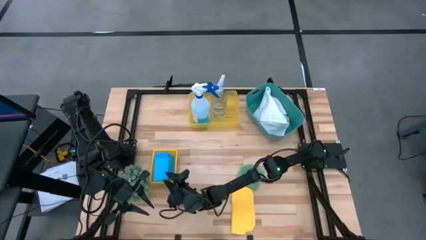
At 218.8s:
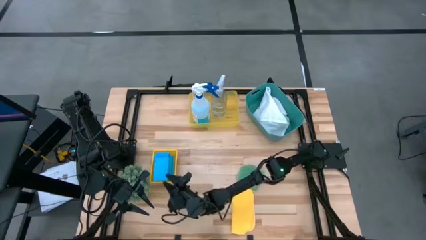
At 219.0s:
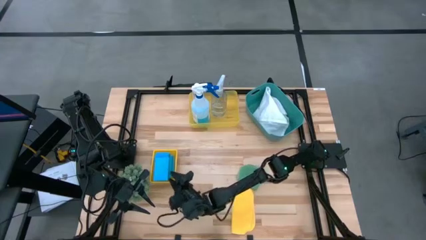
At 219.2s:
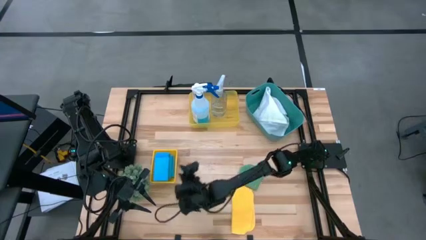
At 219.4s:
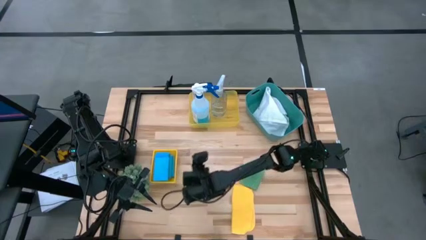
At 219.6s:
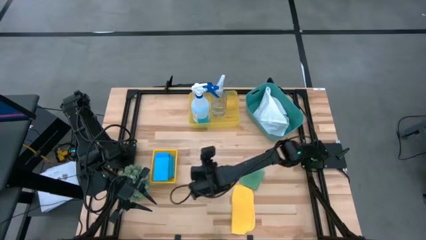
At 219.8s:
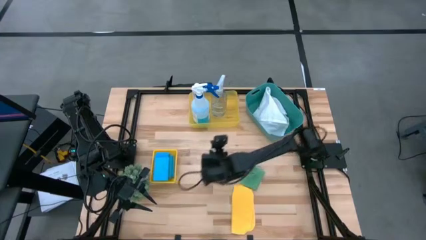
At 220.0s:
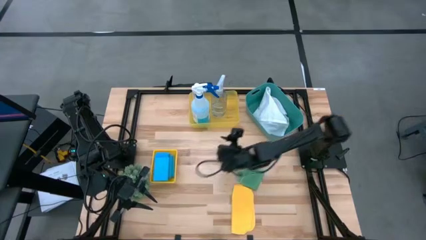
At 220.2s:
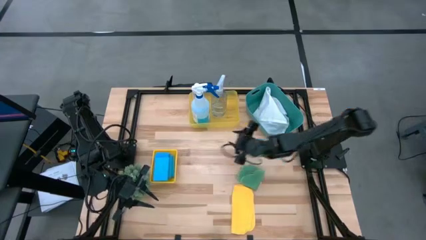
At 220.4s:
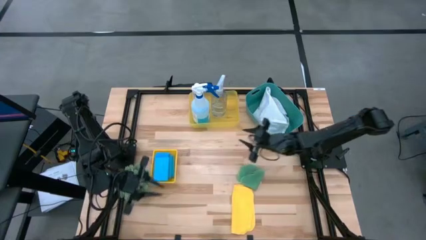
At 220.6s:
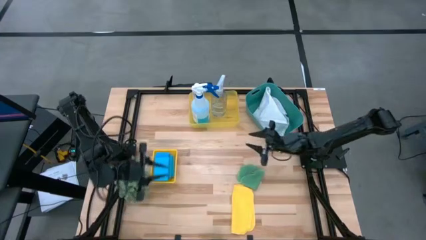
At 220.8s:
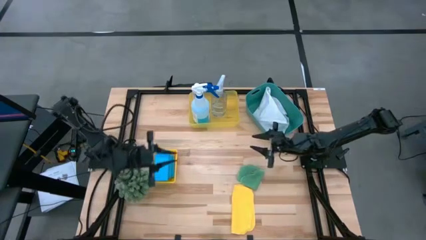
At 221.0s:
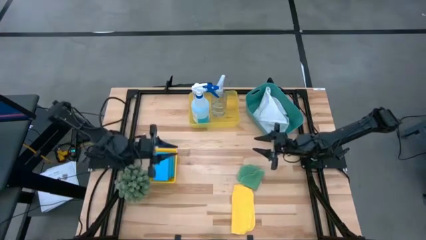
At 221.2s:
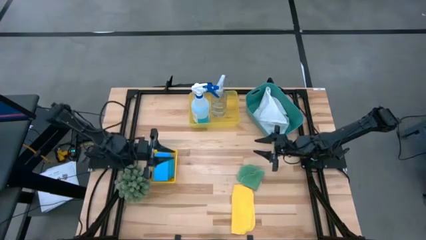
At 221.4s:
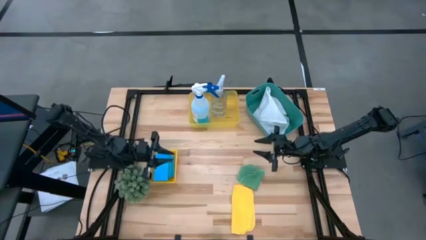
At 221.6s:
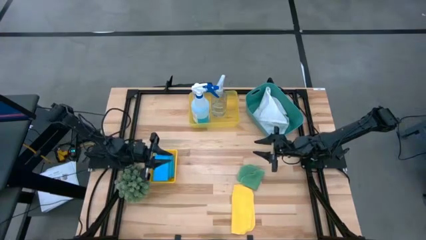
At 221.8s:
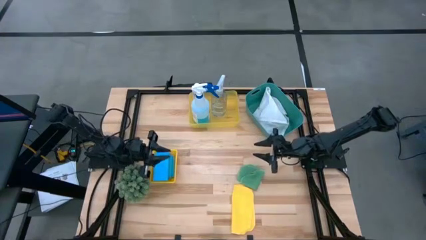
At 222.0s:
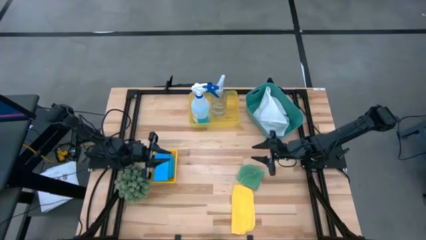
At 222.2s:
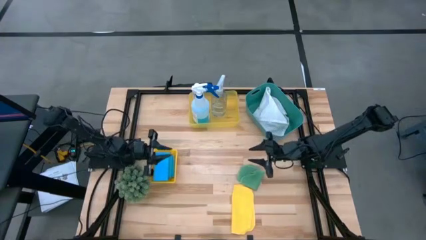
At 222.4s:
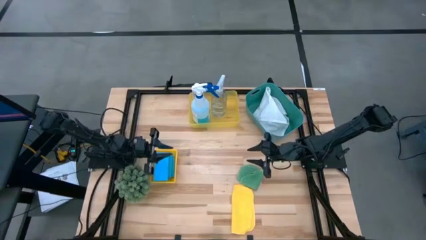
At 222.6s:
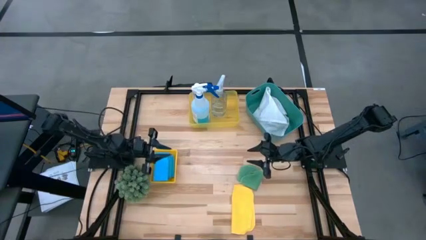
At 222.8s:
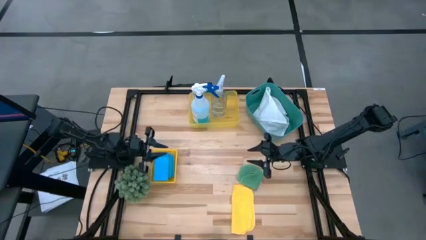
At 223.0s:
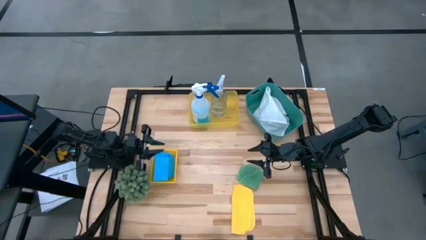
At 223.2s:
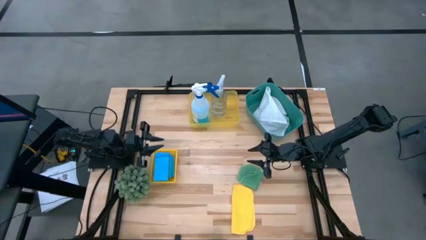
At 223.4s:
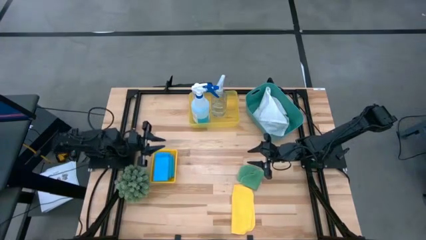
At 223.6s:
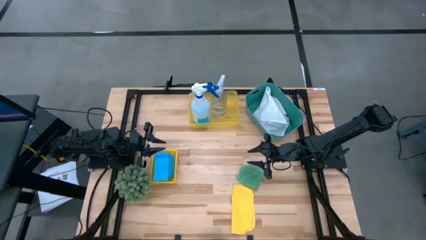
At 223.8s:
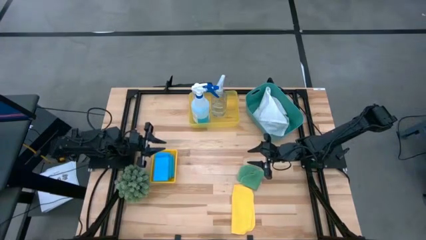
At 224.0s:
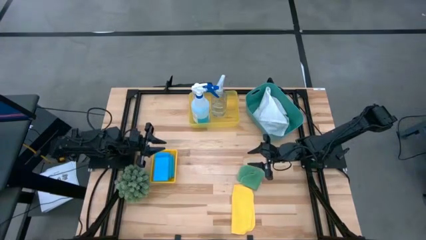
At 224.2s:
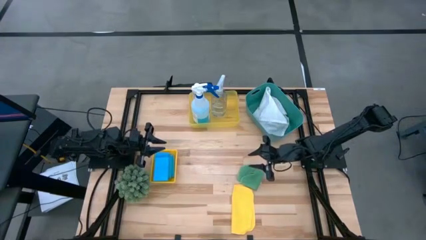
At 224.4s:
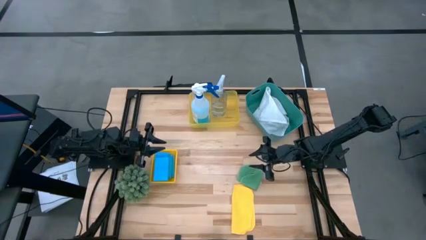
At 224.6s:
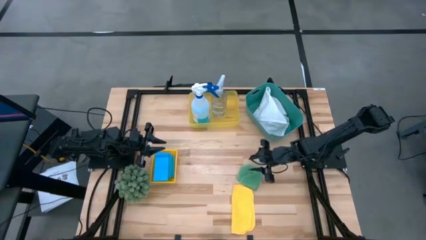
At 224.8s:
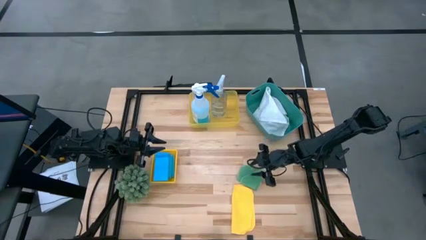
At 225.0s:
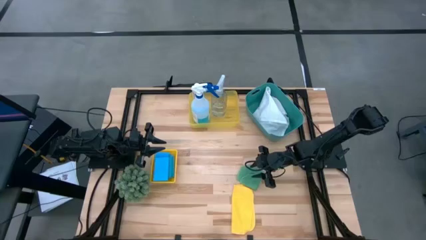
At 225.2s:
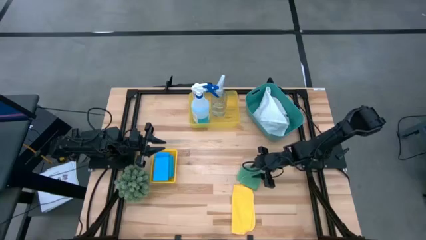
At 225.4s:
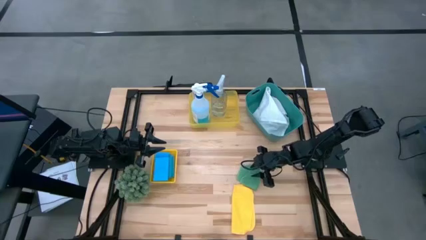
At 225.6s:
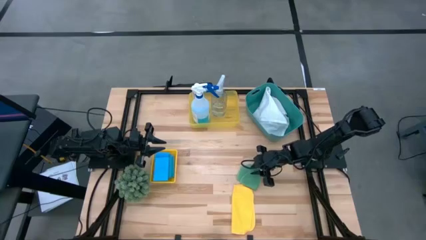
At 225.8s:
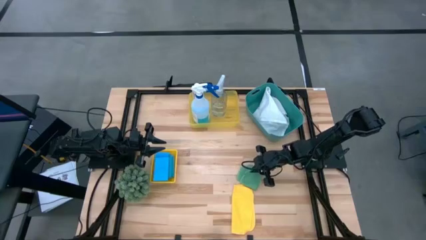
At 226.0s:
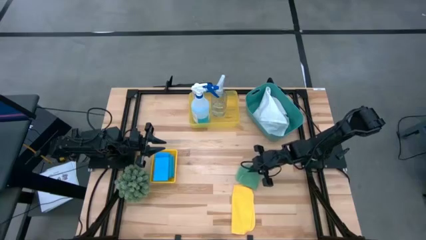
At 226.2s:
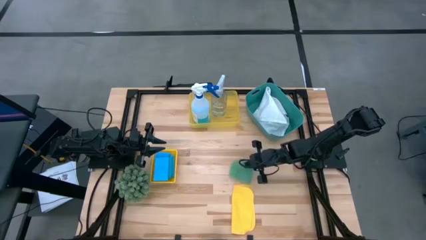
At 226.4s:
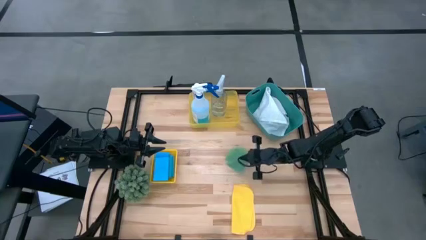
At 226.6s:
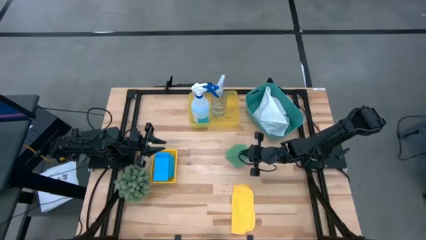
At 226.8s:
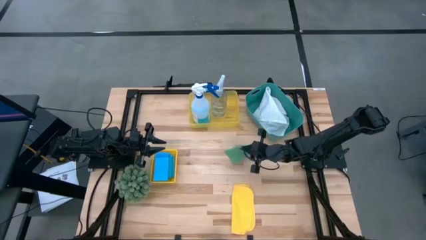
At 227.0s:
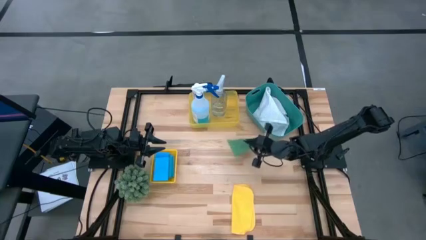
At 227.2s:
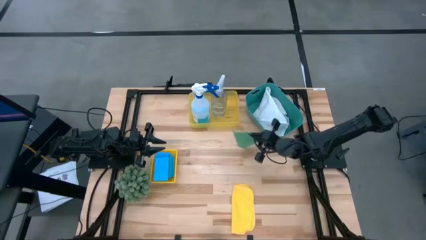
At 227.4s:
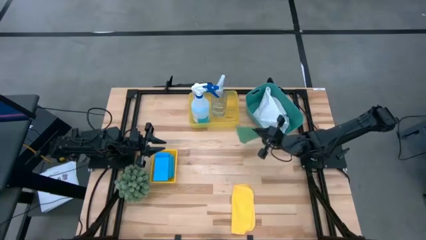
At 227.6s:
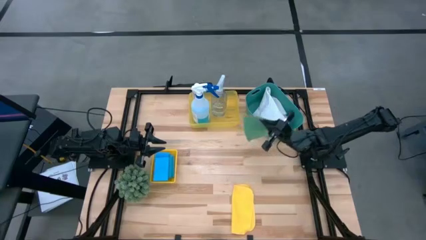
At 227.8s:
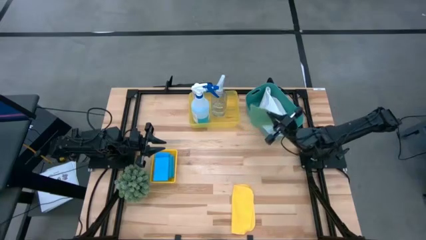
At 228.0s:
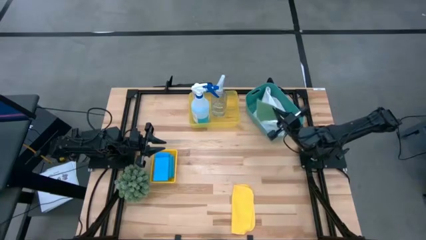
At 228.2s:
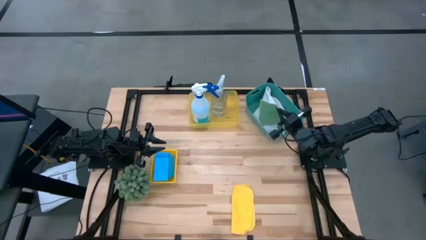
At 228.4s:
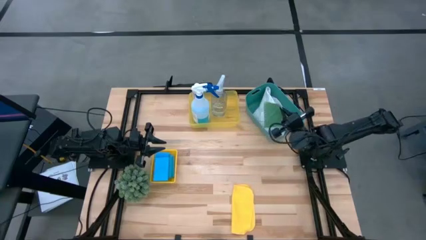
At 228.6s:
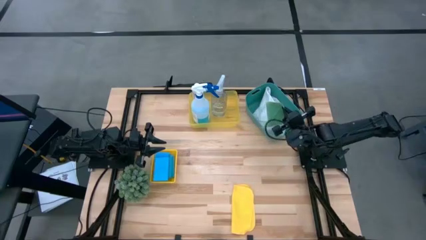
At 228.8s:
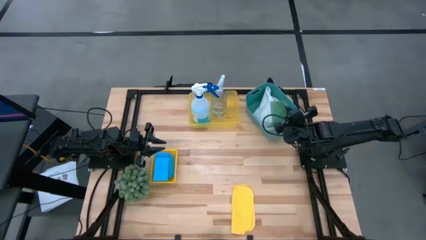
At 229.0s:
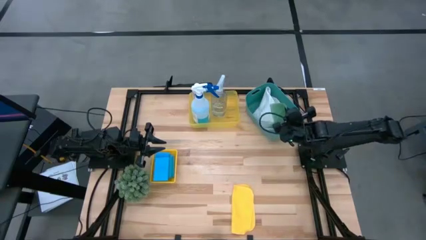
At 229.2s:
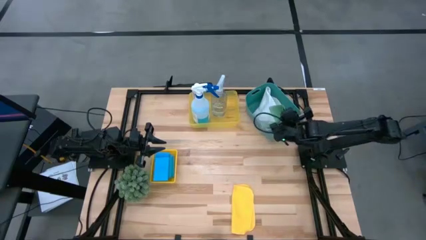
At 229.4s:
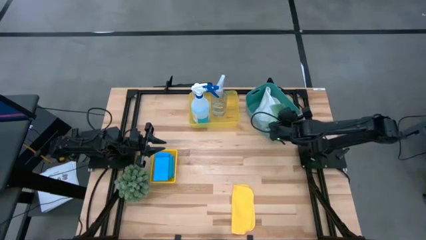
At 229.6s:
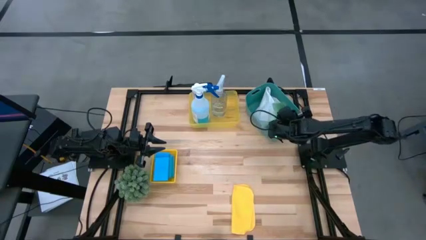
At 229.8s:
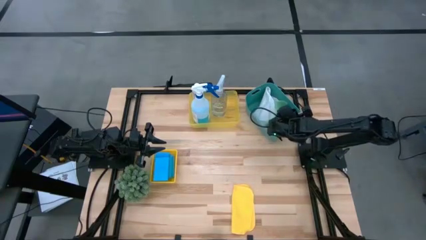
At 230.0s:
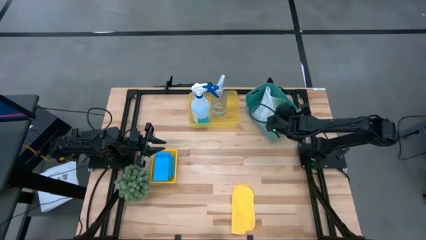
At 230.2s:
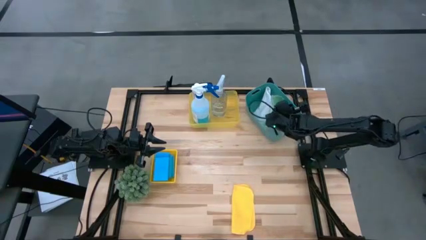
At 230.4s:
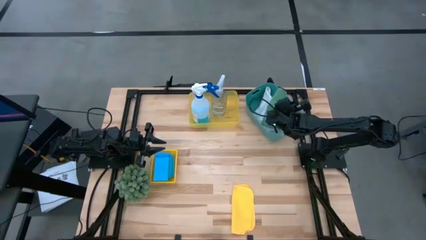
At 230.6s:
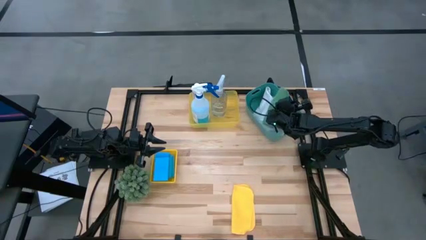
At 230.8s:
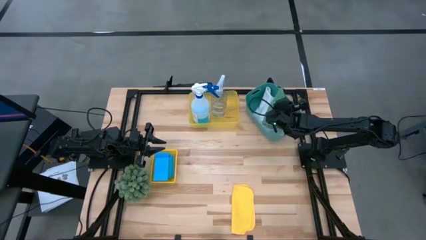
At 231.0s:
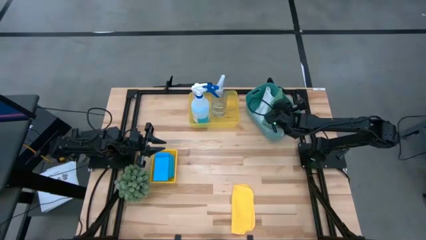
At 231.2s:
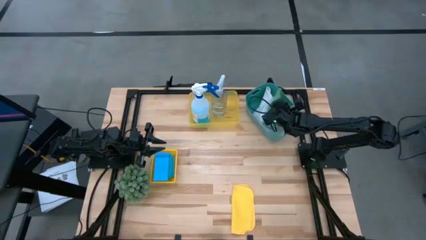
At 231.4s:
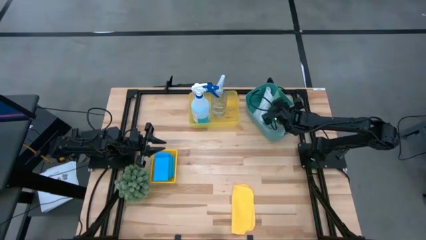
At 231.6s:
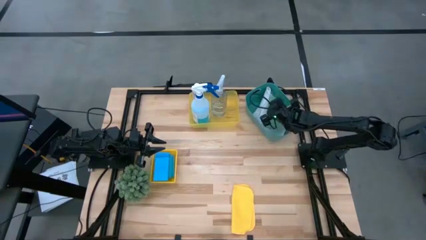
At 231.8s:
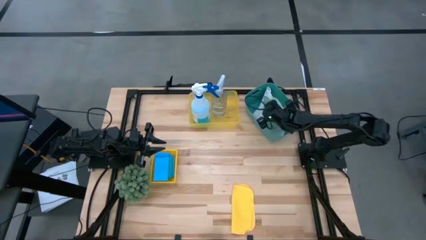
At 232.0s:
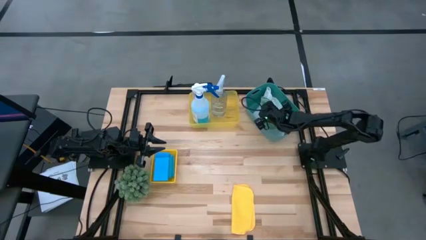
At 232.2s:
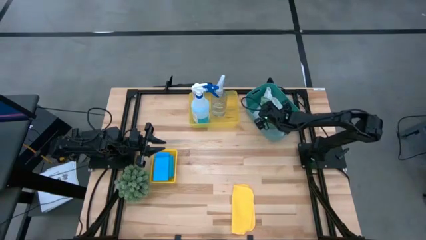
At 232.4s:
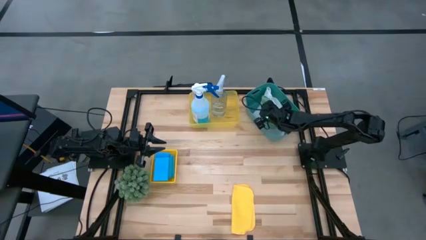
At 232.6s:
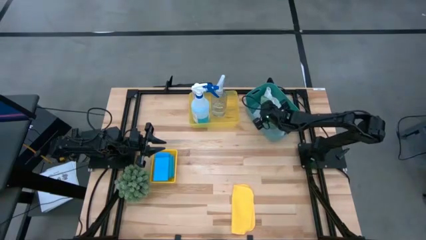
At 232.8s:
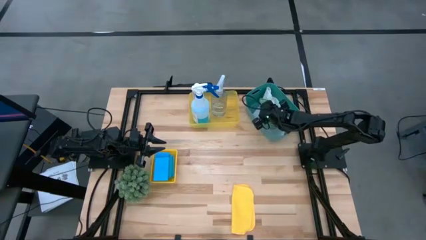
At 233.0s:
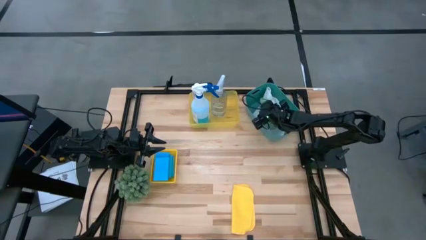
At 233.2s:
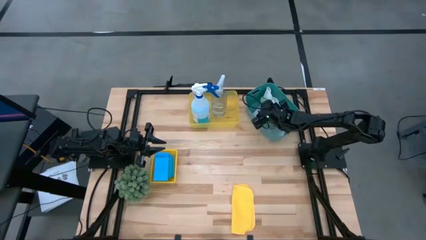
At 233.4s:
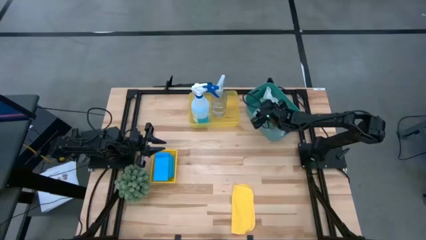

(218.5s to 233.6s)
Task: Pick & Place Kitchen Items
Put the green microfiber cloth into the green bin

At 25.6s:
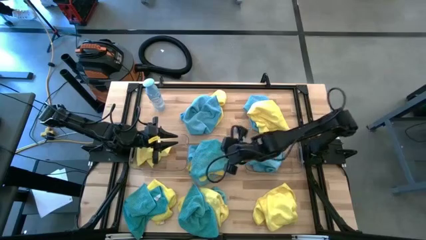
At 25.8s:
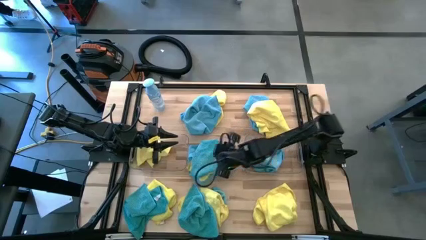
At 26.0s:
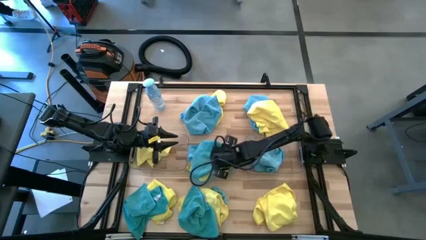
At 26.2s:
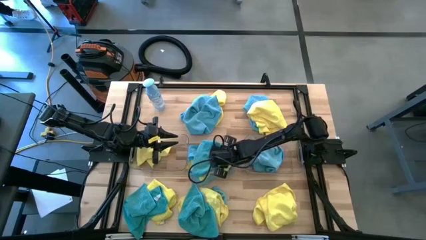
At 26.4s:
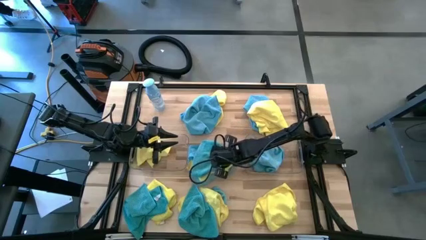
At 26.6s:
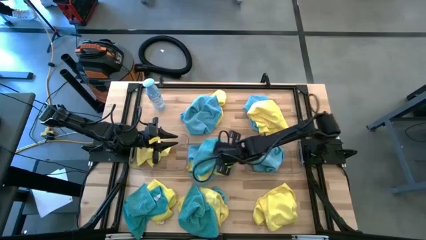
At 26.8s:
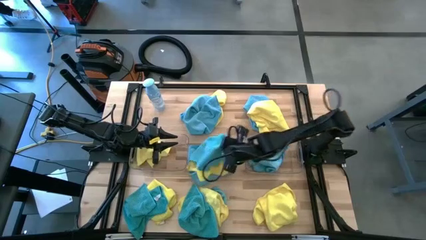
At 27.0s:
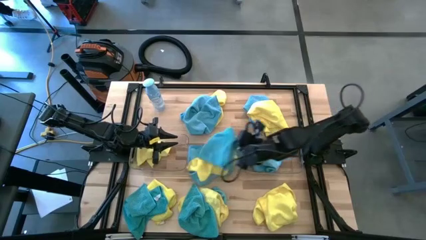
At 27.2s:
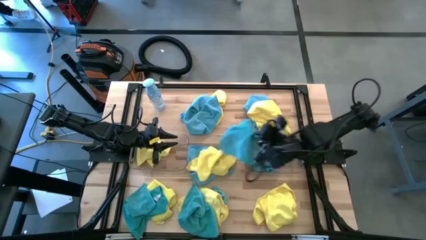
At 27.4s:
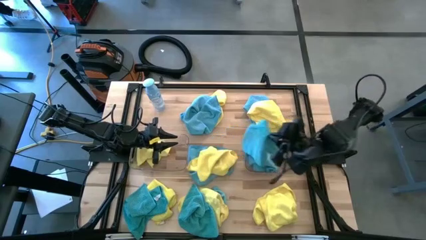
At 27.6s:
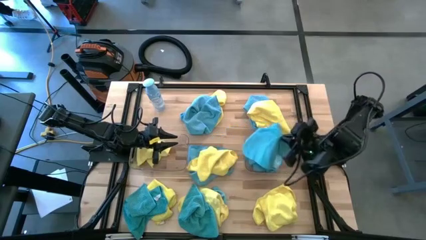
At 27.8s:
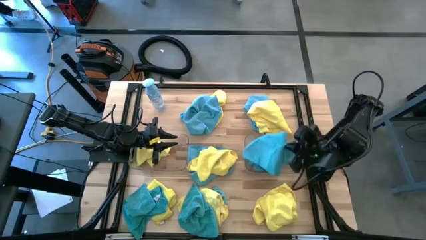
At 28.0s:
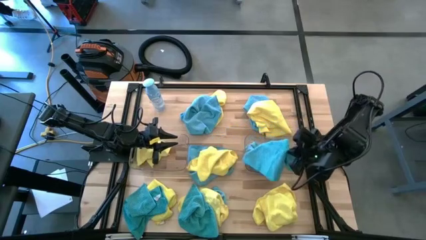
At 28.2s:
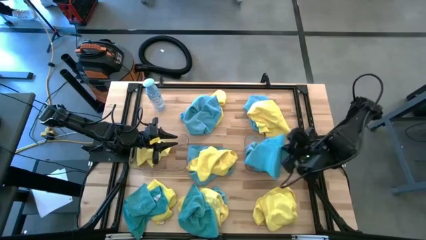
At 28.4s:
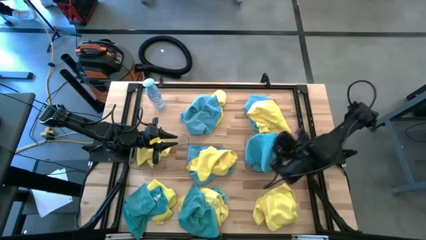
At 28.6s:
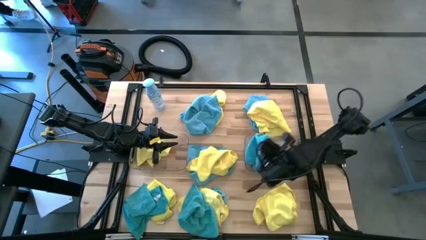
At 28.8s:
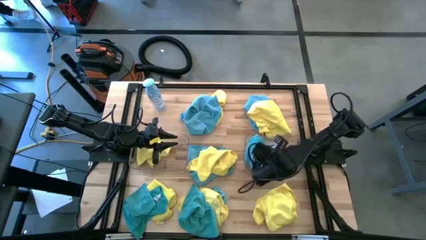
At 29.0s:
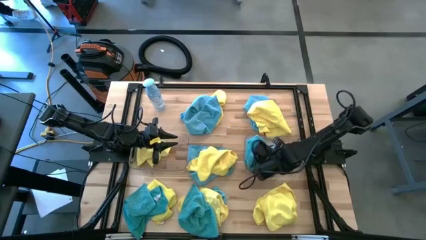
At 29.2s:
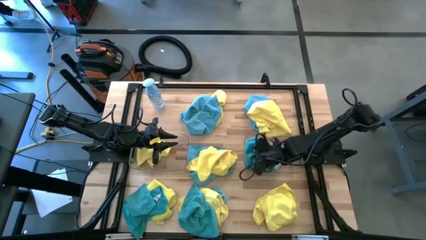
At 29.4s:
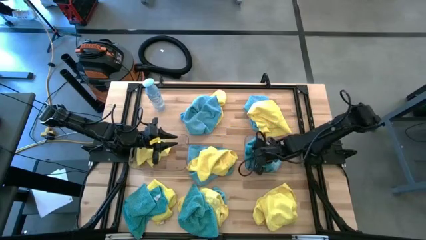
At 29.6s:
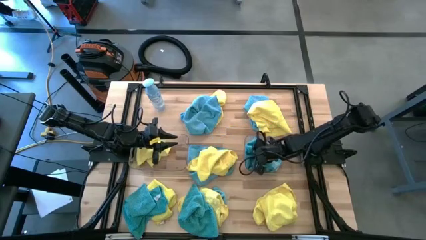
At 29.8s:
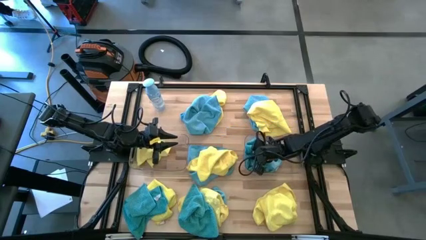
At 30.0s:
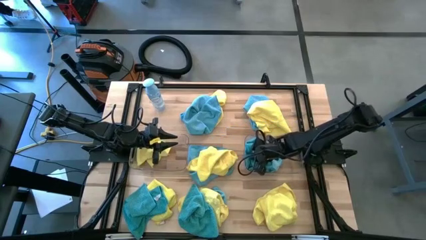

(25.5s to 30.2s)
Task: Sort microfiber towel by color & place in baskets
Put the blue microfiber cloth into the right transparent bin
